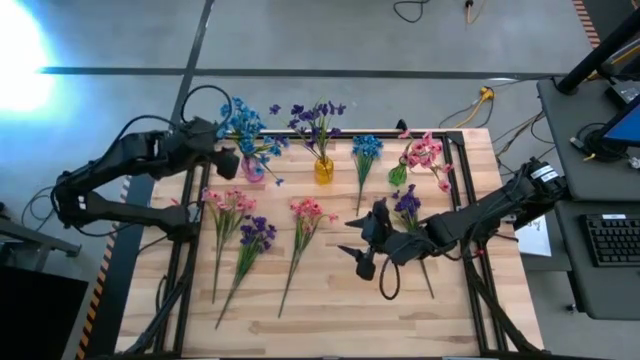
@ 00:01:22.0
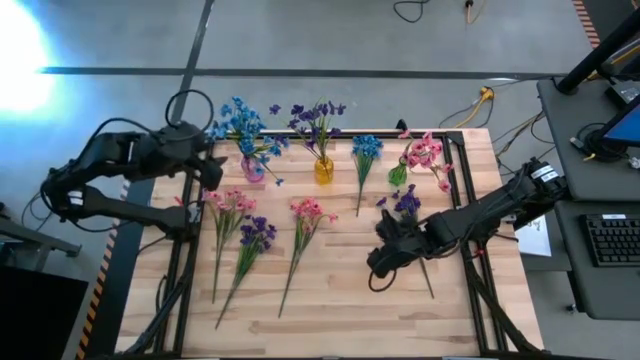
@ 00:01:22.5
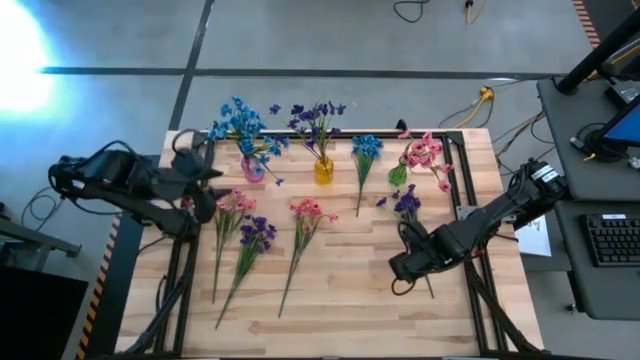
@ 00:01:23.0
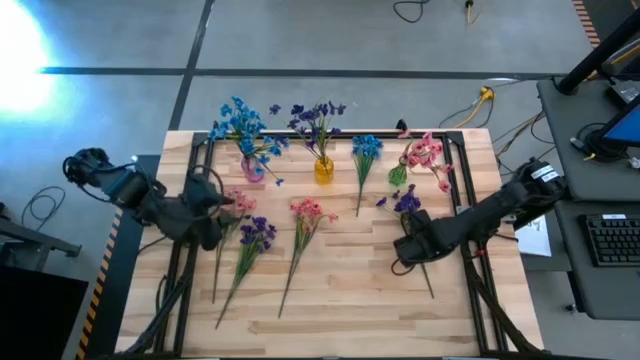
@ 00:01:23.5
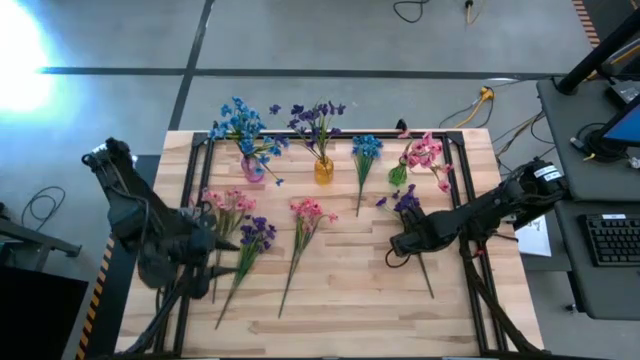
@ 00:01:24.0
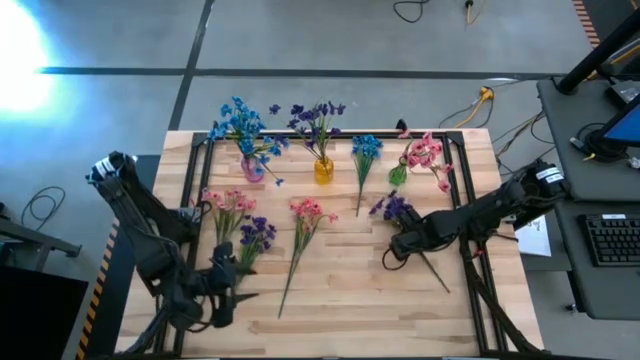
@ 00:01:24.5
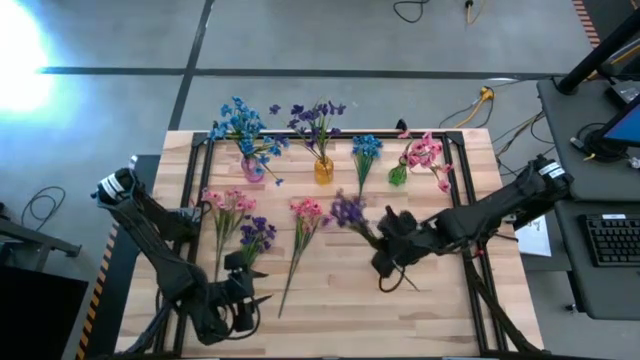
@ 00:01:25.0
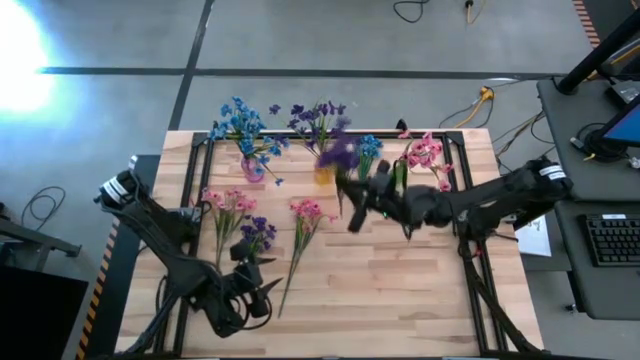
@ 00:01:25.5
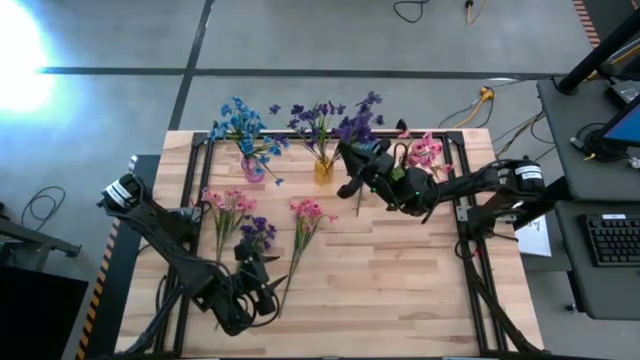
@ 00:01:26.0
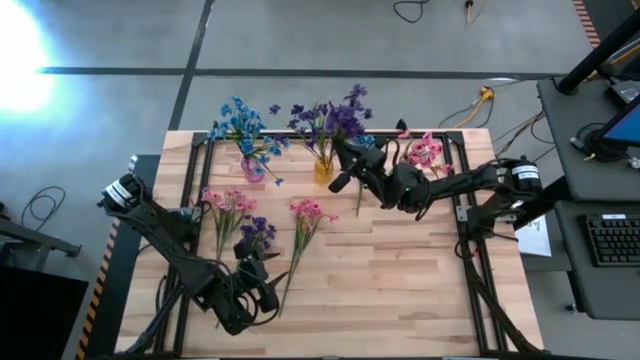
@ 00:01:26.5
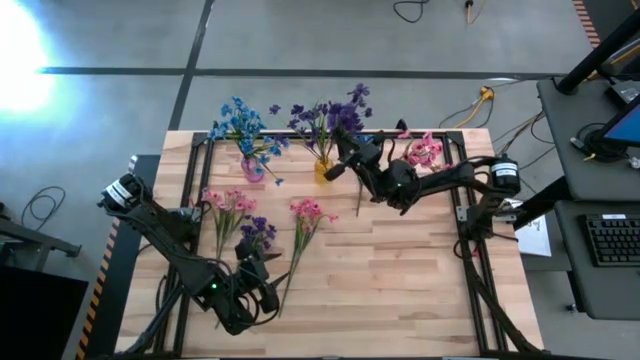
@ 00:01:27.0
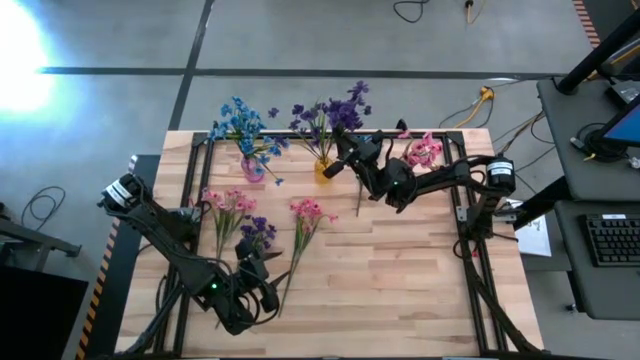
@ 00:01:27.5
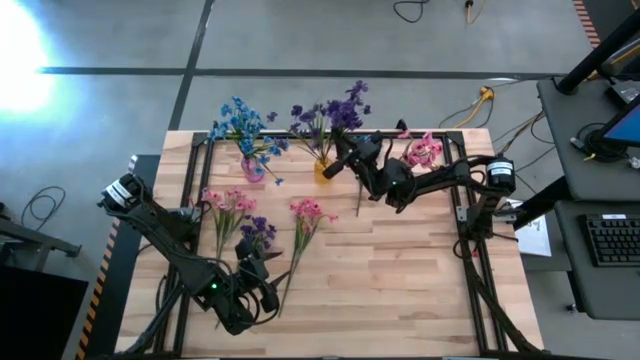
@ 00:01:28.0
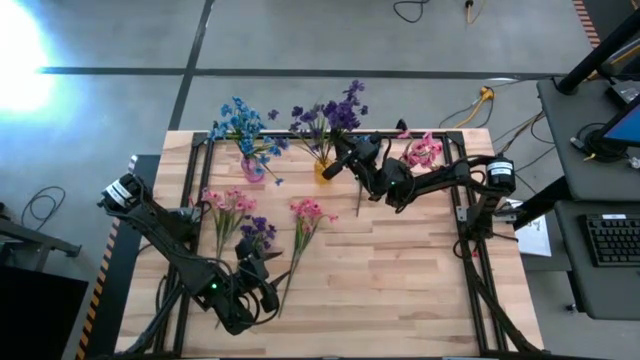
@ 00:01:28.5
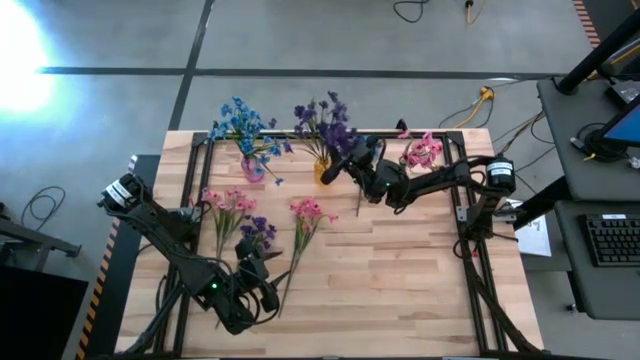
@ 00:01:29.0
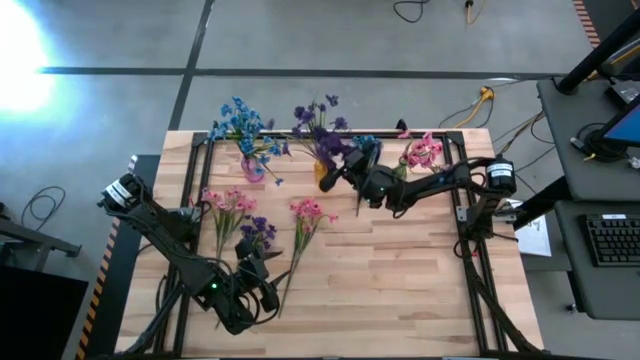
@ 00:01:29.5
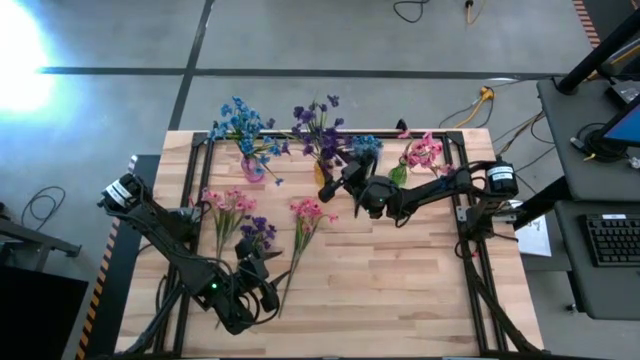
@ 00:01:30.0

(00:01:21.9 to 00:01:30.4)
Task: Sort flowers into vase by color
Put the right violet flowers into the yellow vase

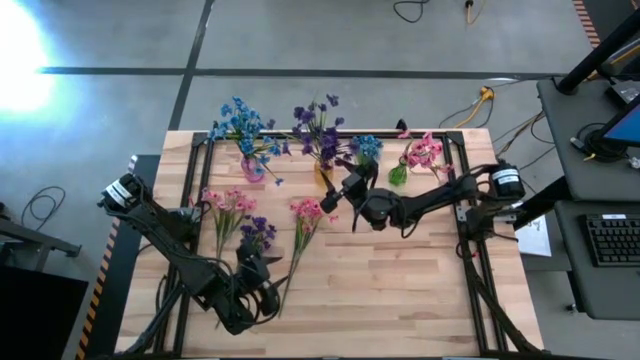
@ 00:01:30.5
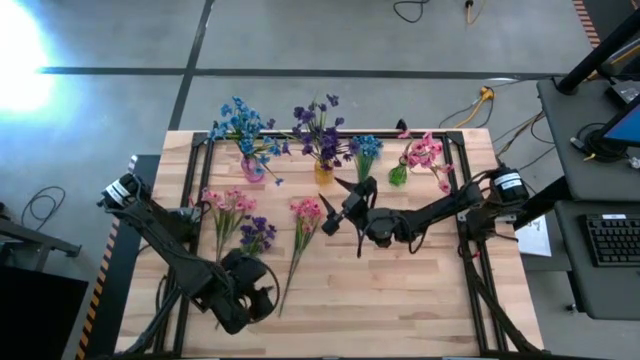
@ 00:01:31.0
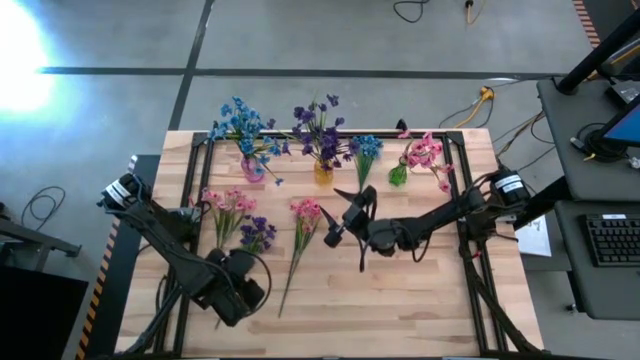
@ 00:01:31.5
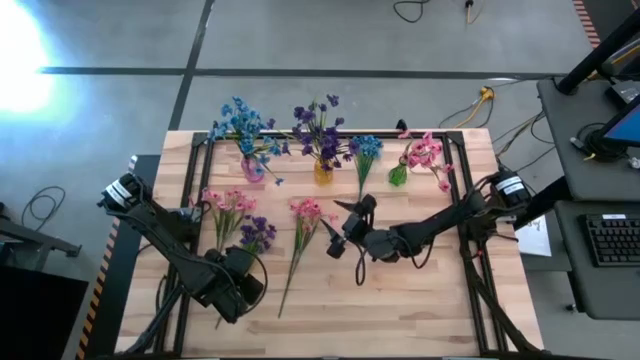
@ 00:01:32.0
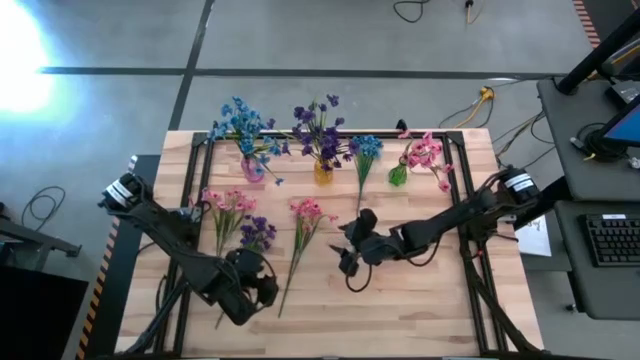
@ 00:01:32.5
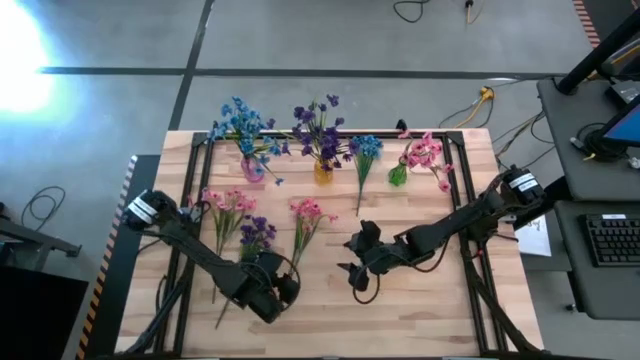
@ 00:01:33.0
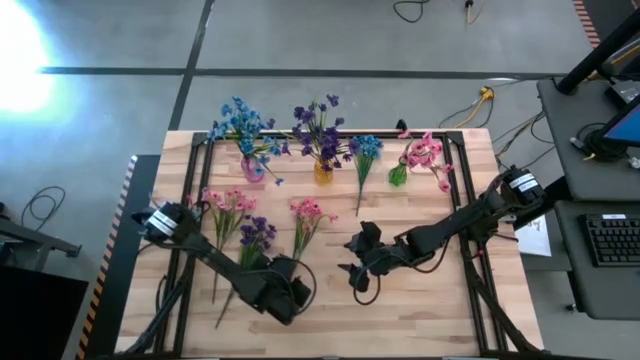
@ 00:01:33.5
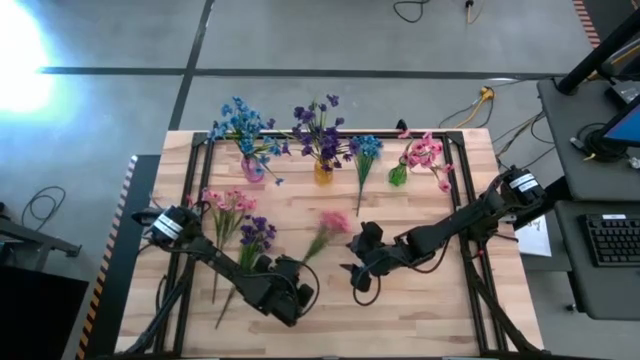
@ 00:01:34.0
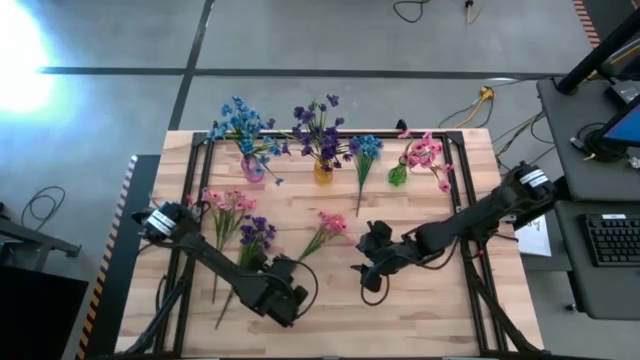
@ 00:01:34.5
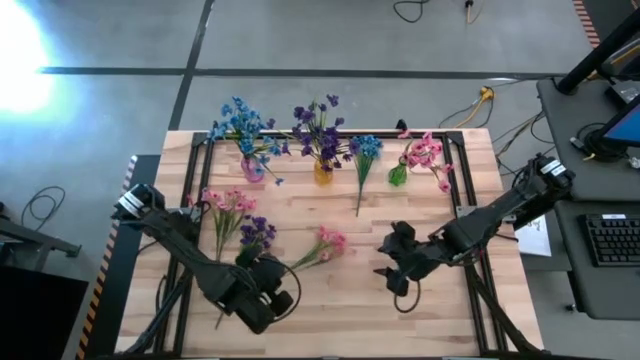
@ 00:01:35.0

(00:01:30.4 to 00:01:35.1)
Put the right pink flowers into the green vase

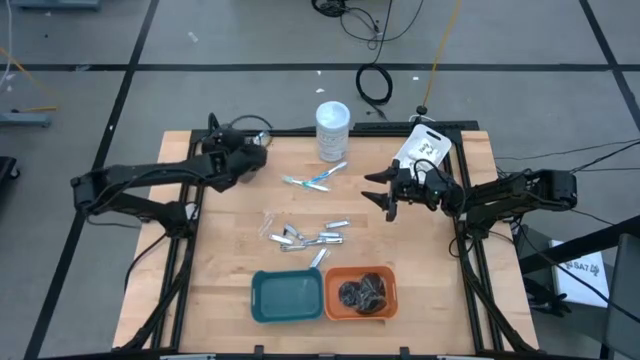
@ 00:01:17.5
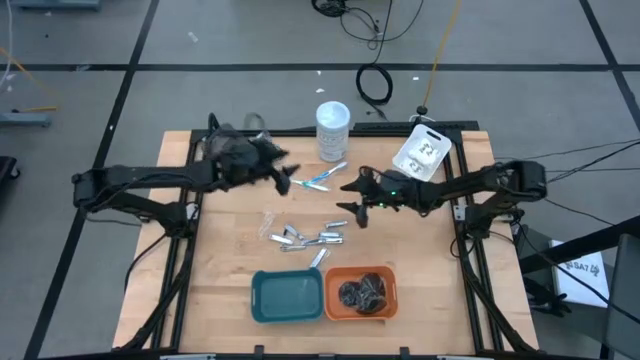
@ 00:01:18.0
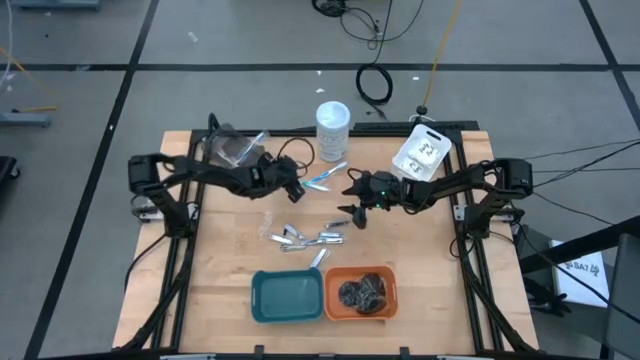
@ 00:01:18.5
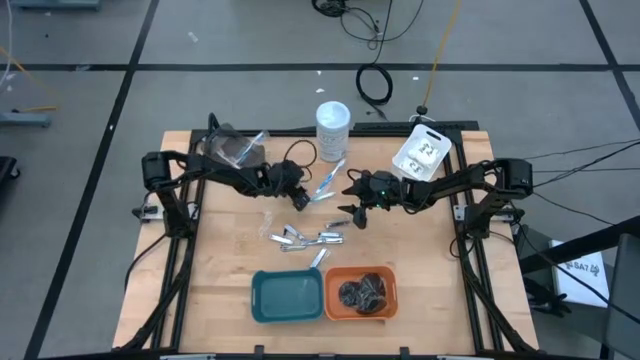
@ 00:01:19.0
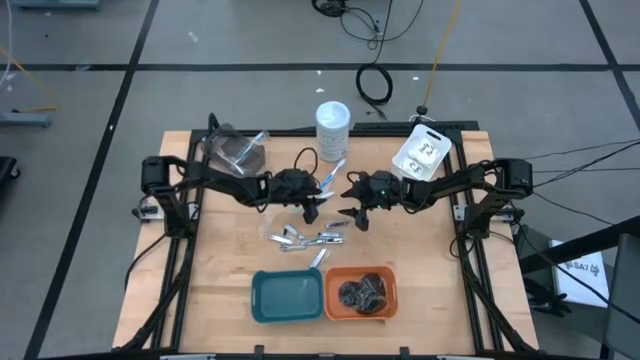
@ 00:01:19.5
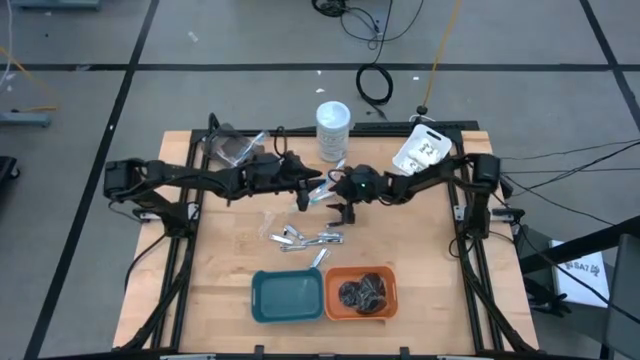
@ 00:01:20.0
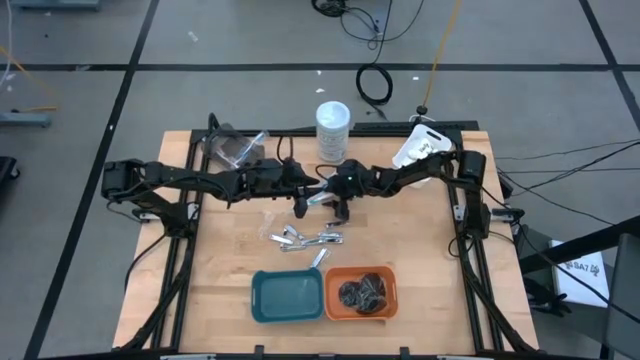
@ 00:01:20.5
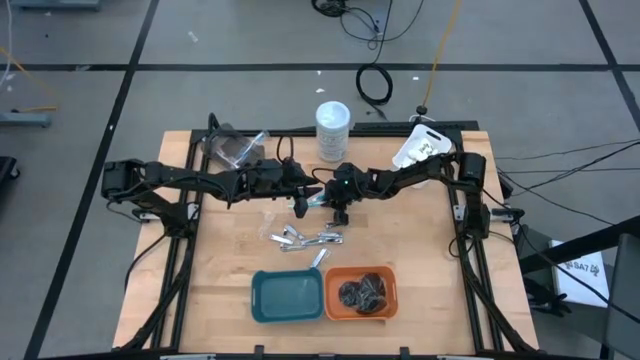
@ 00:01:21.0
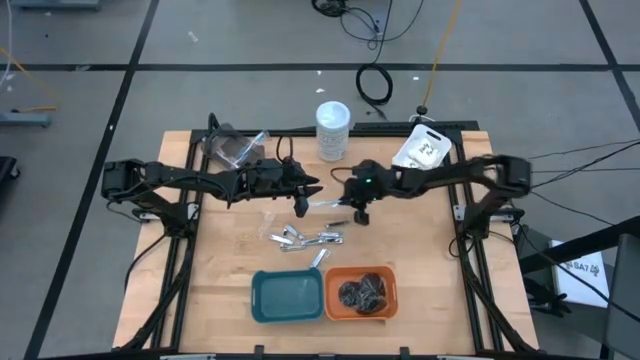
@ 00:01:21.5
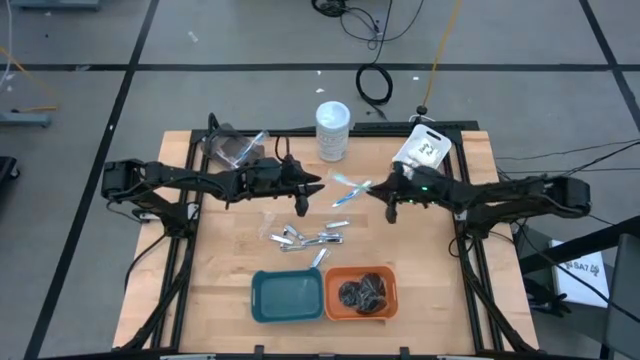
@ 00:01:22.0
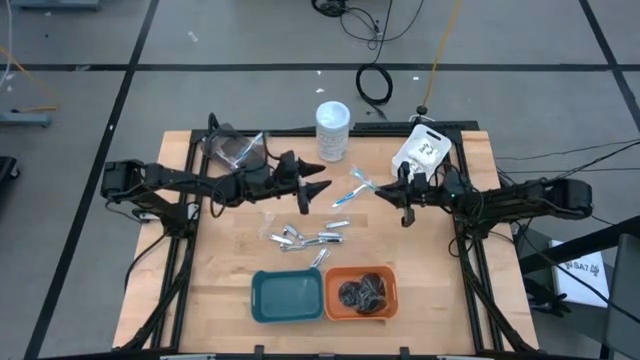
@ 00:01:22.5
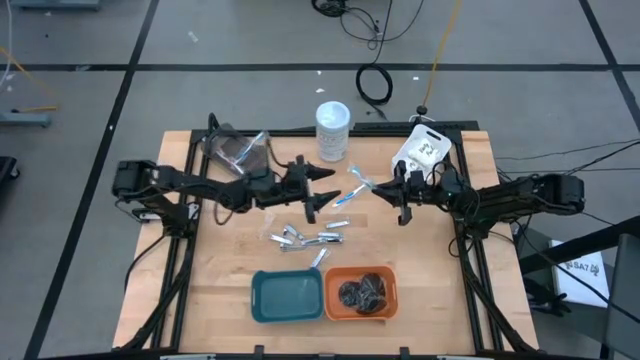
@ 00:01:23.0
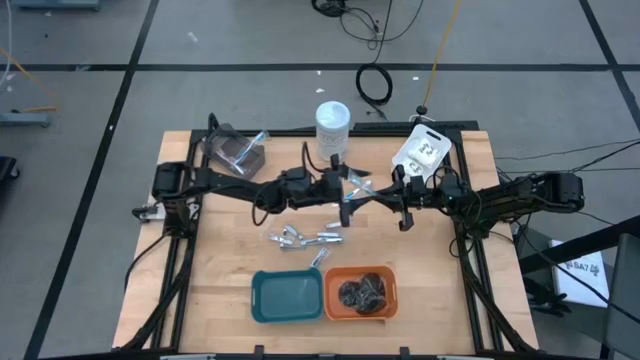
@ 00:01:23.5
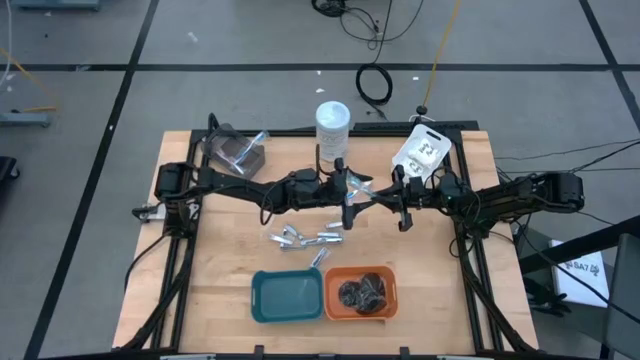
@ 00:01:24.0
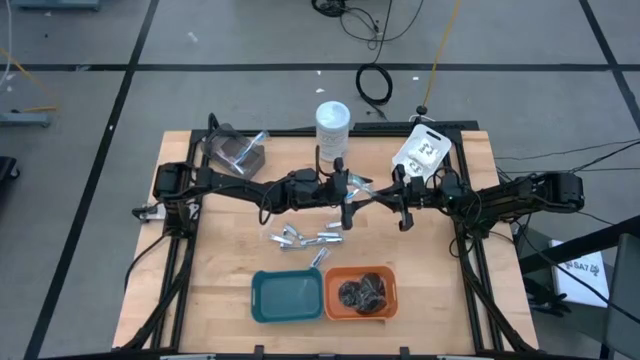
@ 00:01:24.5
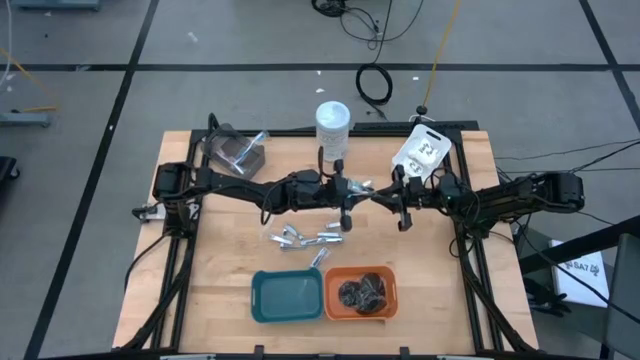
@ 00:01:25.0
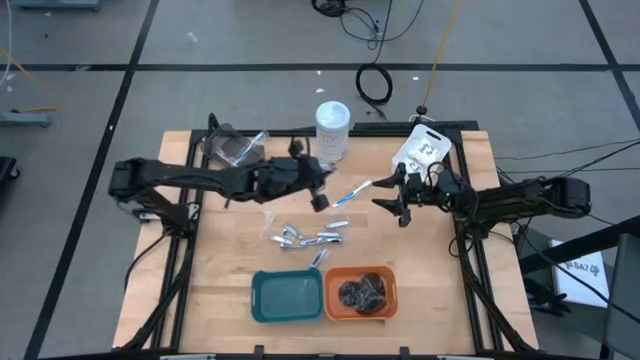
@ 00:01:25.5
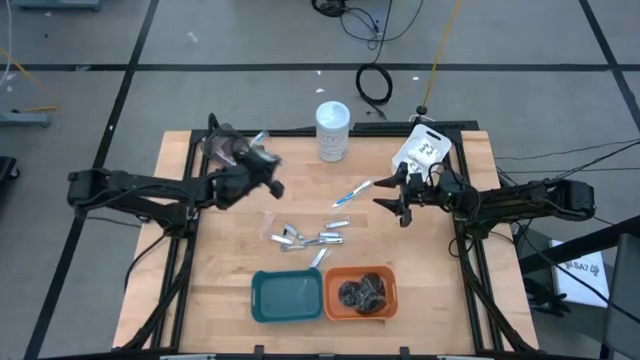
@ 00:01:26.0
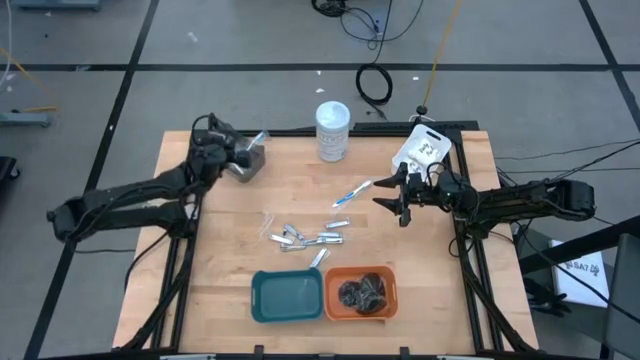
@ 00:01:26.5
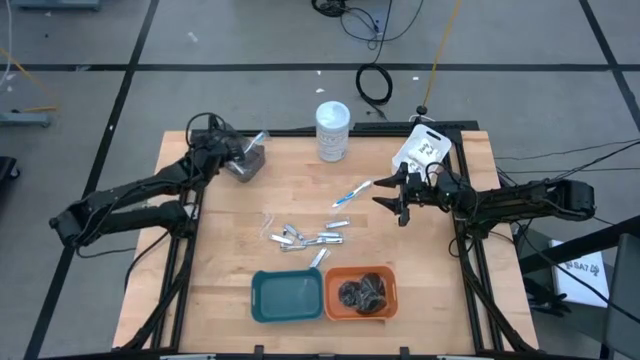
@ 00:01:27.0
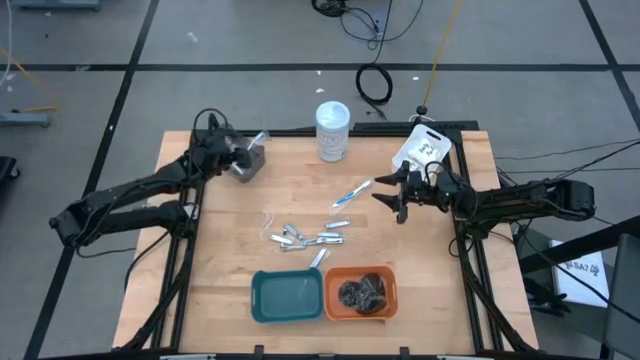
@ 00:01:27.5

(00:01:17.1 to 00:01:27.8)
Task: Pick & Place Travel size toiletries
Put the green toothbrush into the black bin
